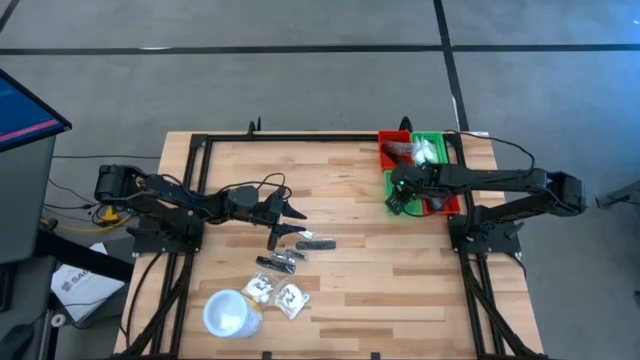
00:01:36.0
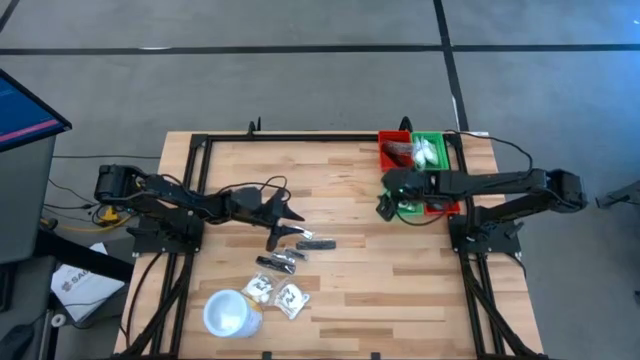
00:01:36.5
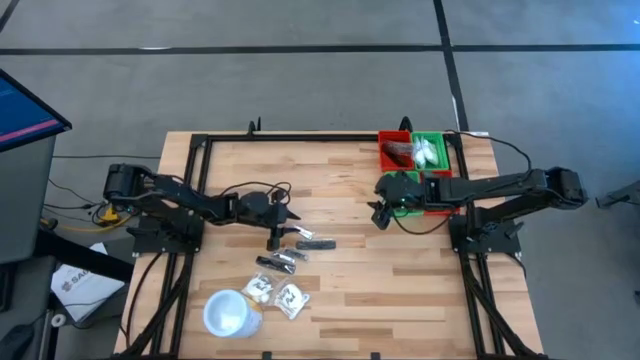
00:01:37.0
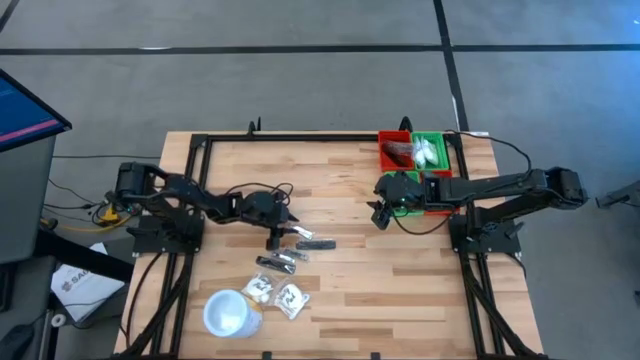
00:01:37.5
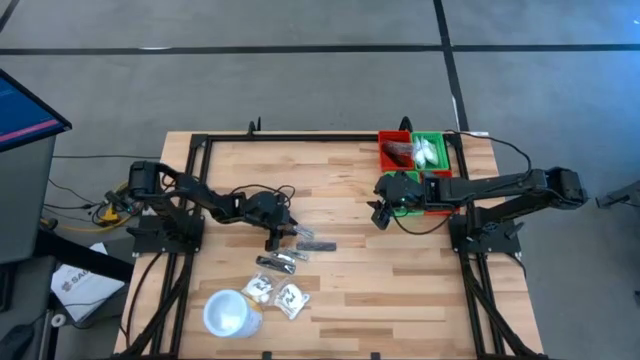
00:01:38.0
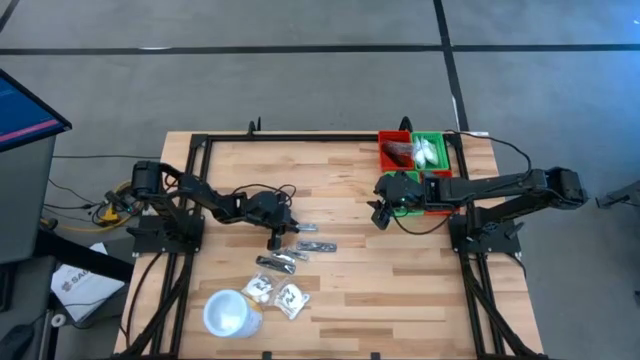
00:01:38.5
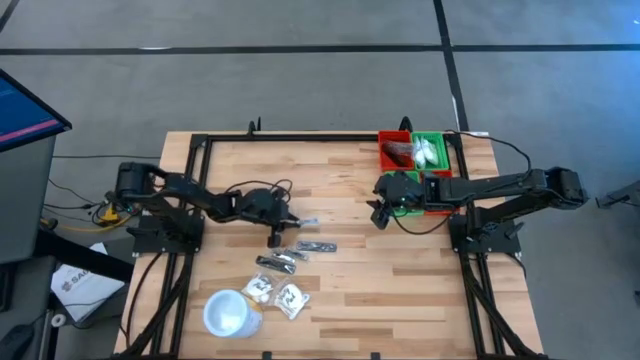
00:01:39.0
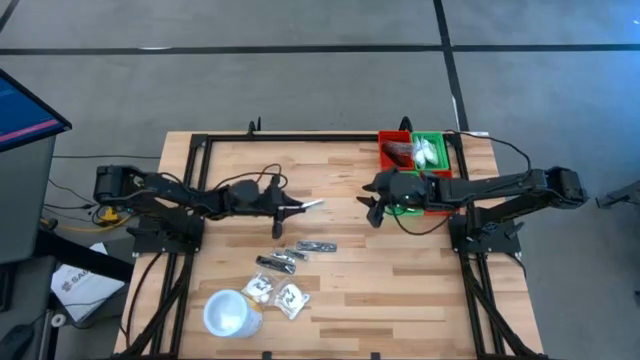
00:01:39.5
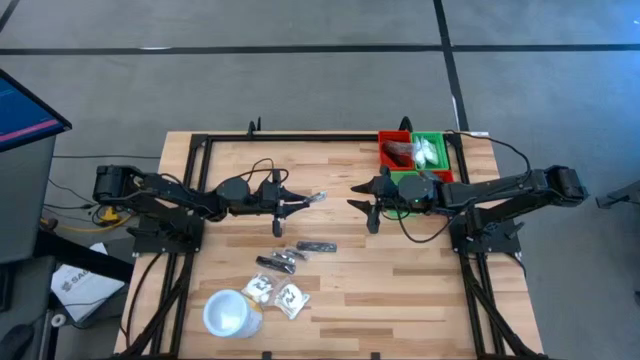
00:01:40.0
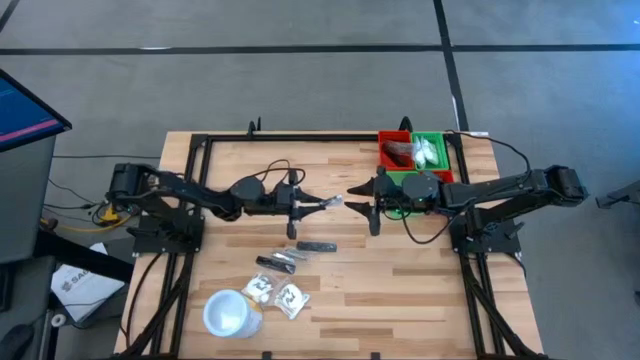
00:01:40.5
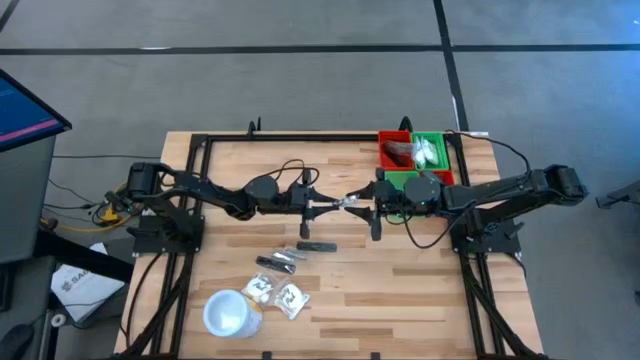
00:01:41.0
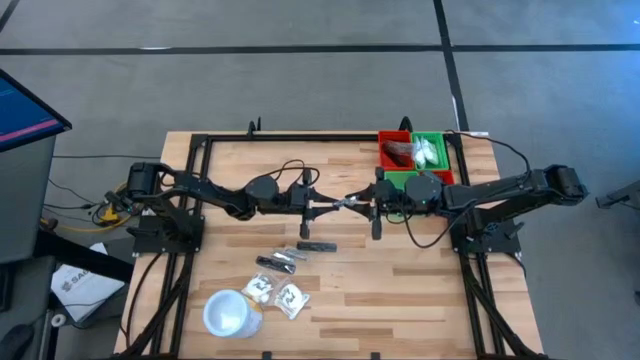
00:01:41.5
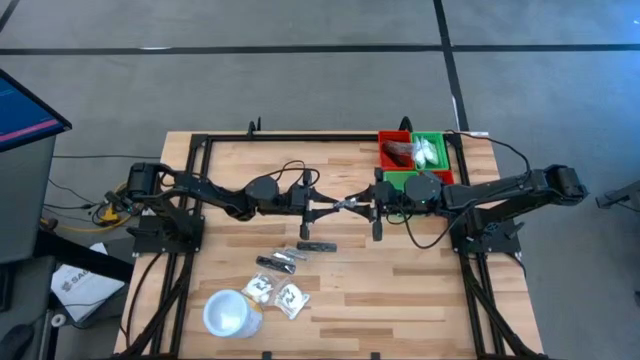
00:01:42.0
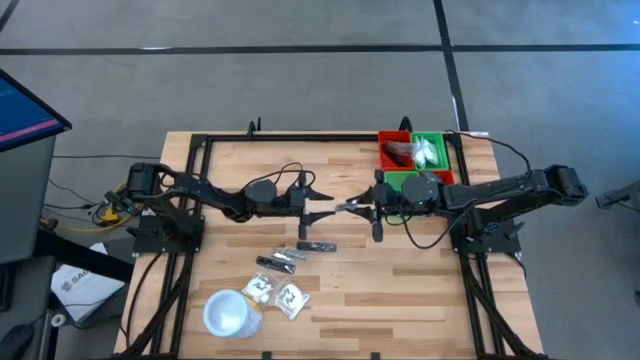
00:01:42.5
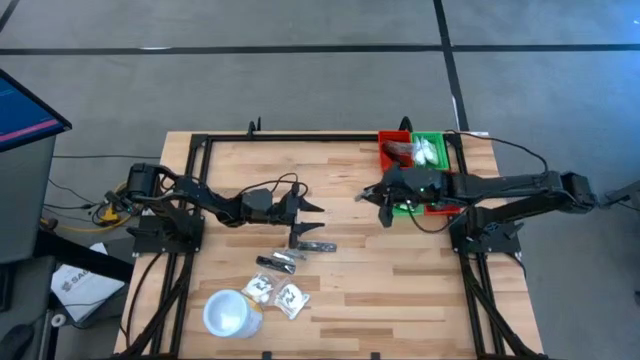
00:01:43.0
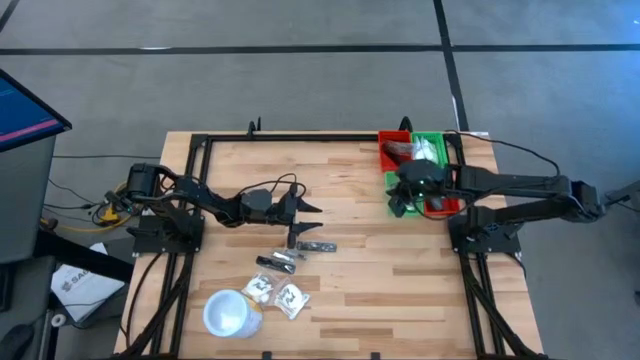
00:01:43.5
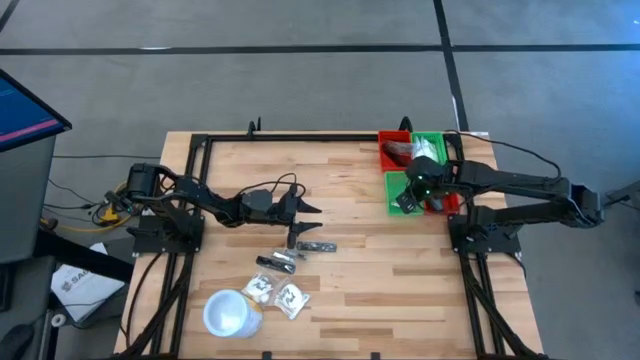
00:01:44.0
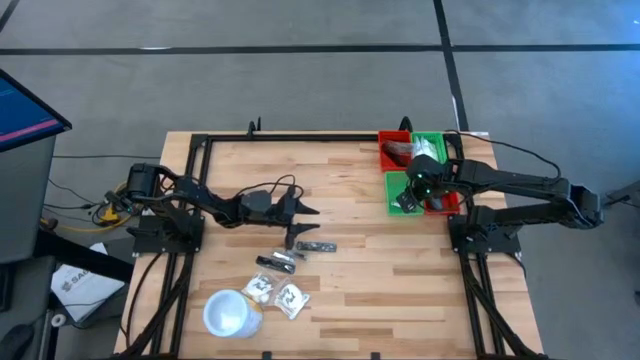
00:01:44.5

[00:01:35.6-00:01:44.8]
Task: Pick & Place Travel size toiletries
Put the silver nail cutter into the bottom green bin

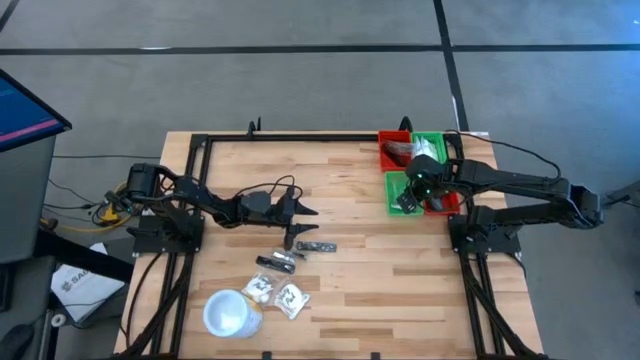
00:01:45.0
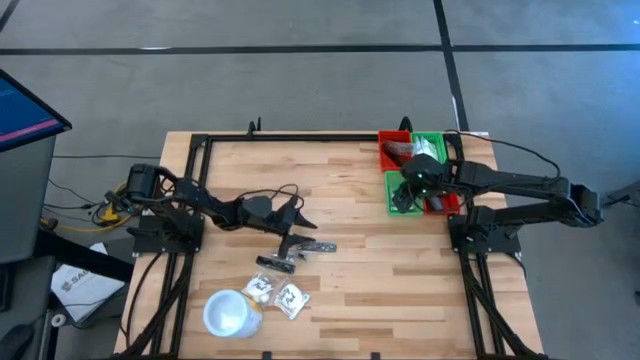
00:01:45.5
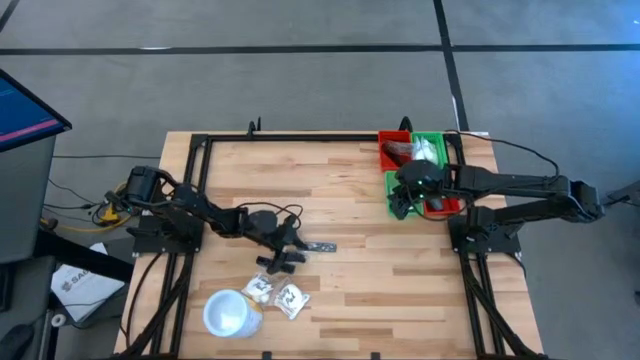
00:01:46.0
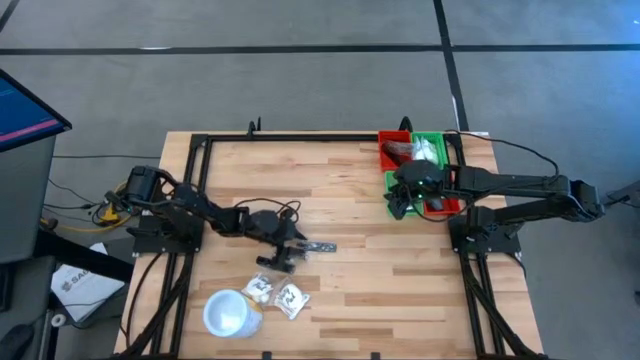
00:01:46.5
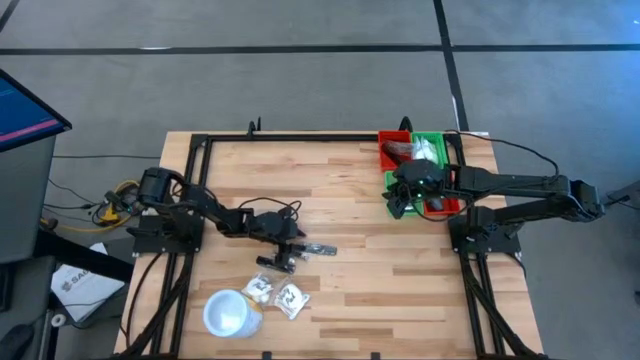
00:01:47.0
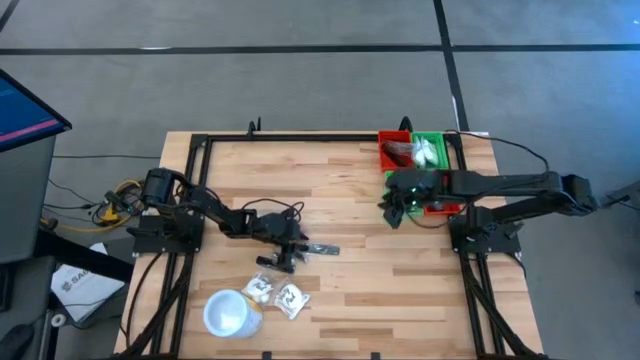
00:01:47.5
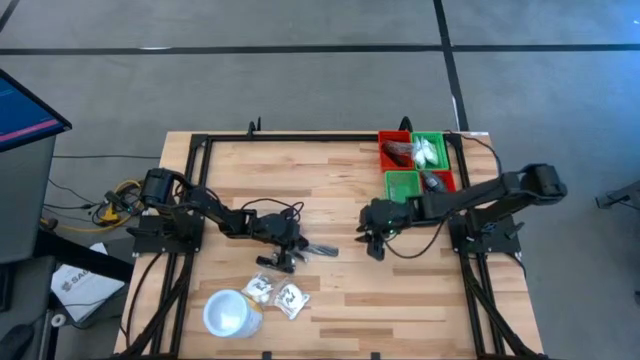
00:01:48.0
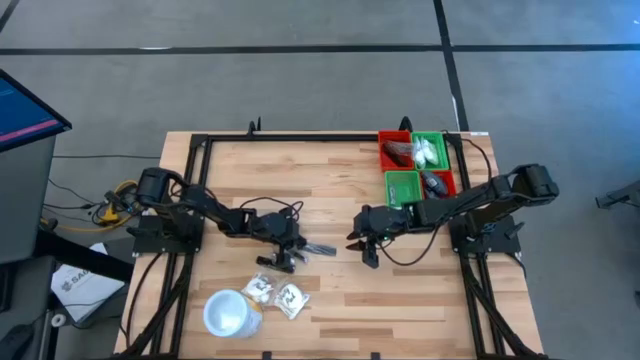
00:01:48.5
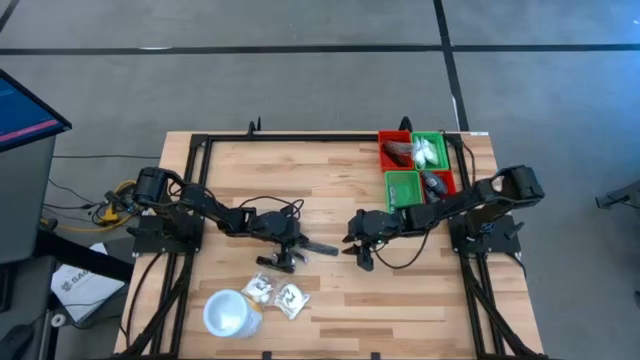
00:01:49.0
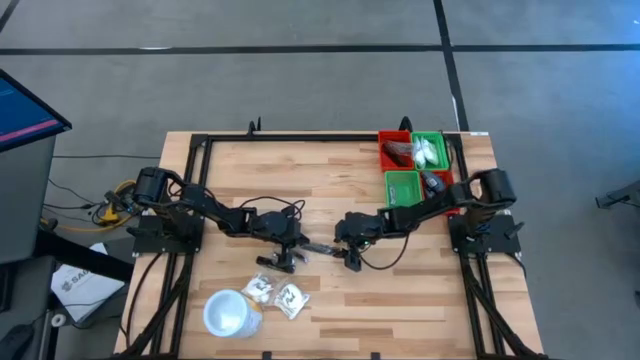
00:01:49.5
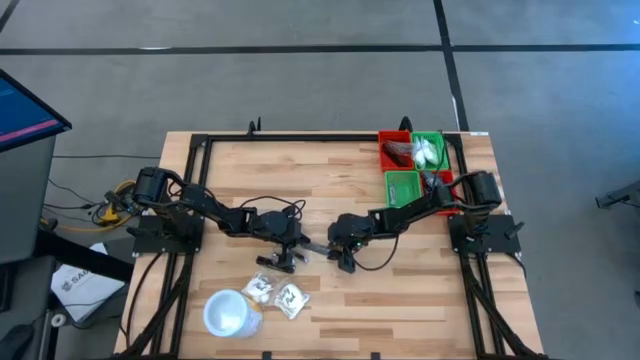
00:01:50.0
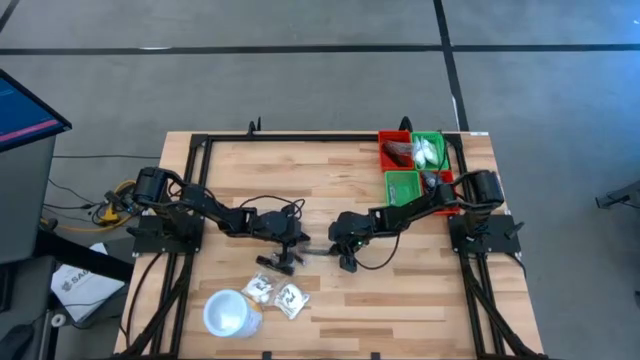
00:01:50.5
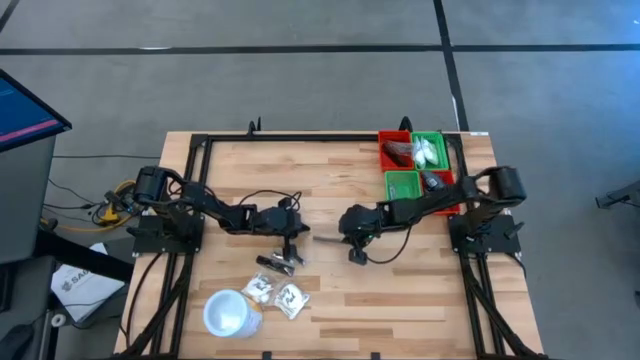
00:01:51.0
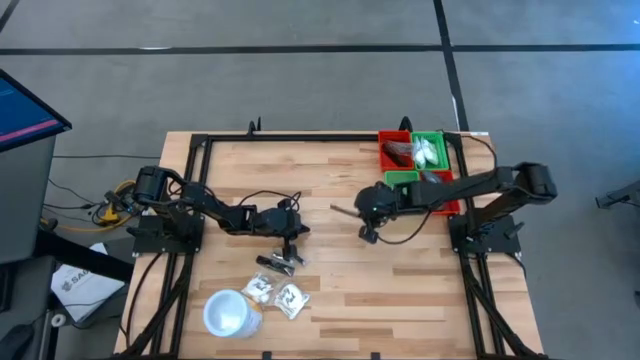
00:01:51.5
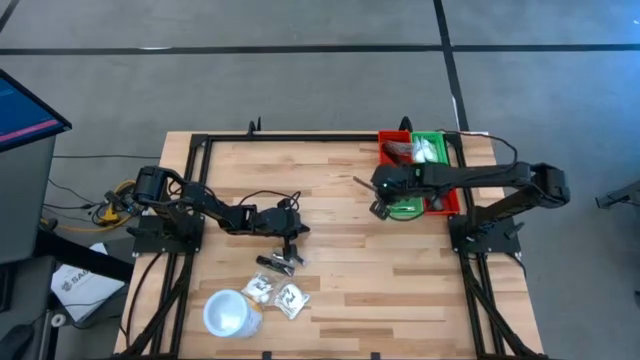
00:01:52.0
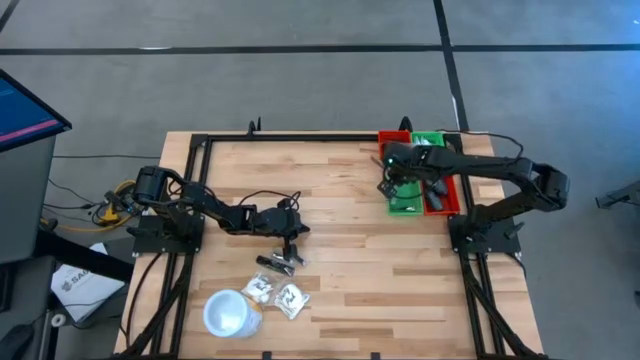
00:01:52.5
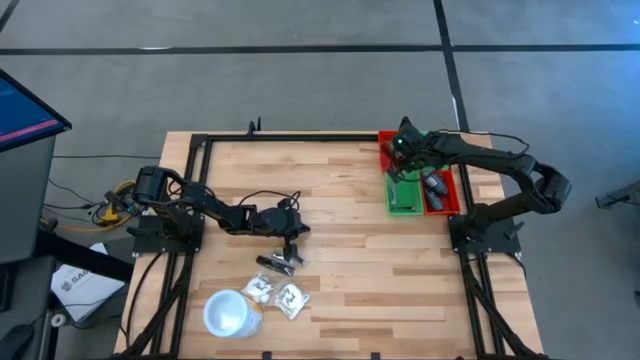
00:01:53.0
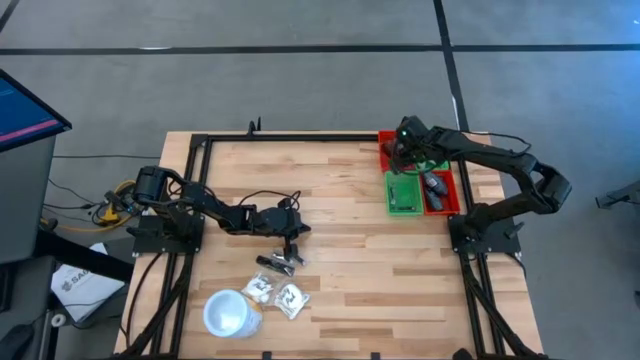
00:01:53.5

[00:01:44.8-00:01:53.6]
Put the black hair comb into the top red bin

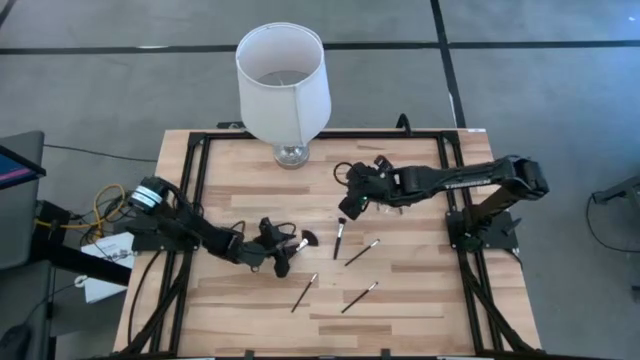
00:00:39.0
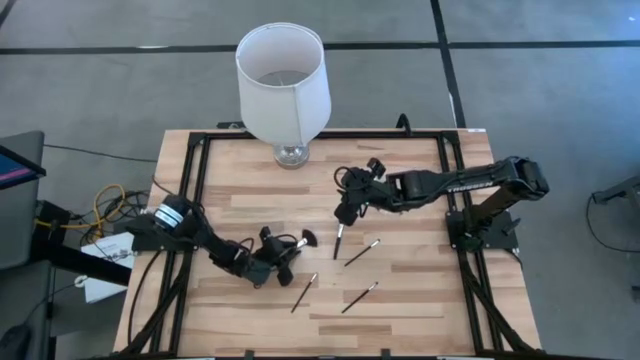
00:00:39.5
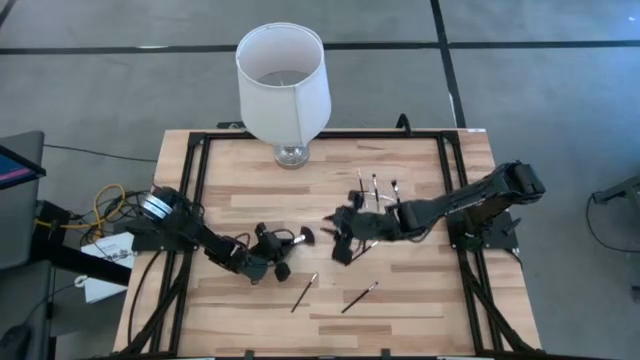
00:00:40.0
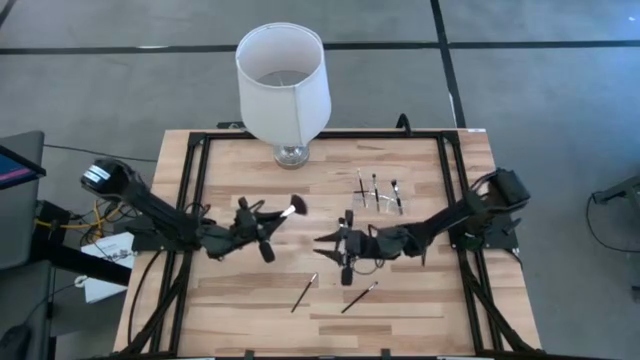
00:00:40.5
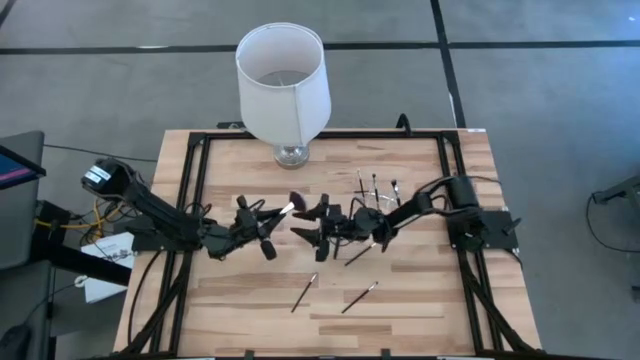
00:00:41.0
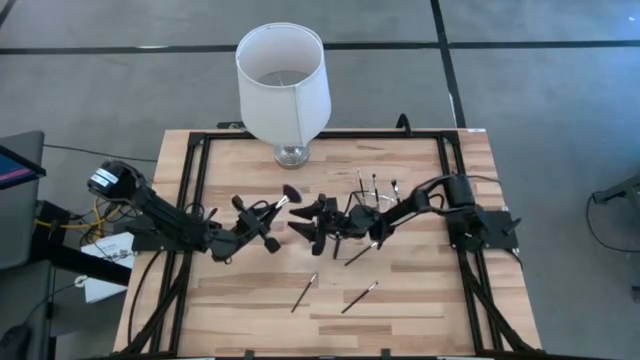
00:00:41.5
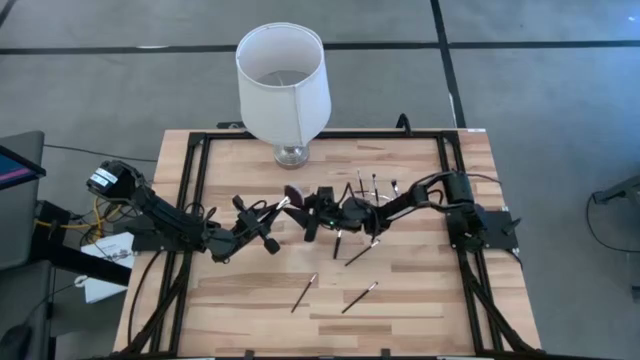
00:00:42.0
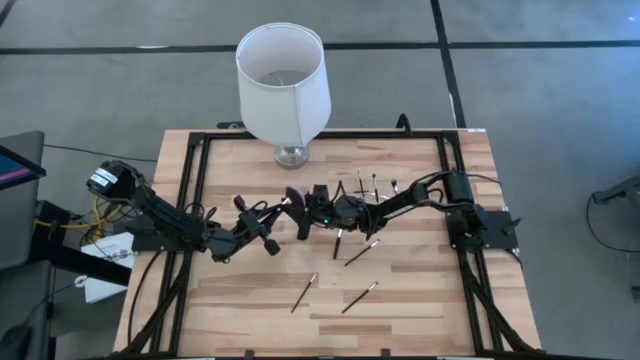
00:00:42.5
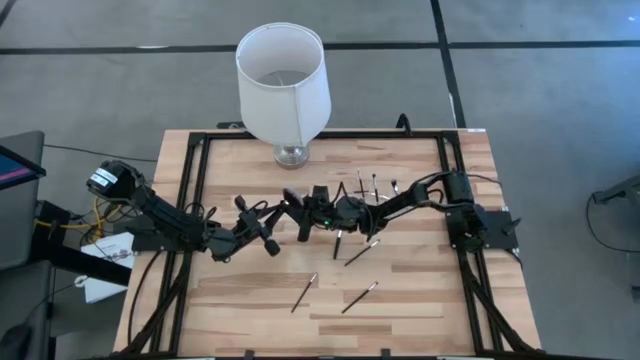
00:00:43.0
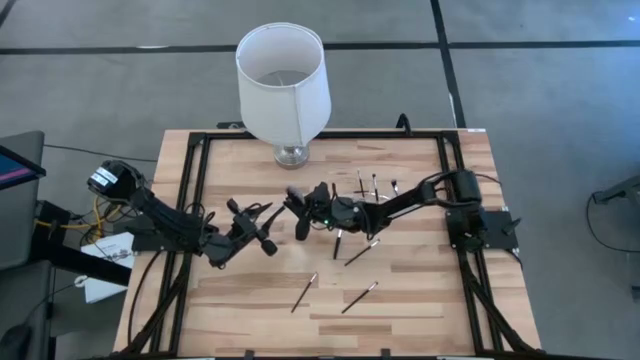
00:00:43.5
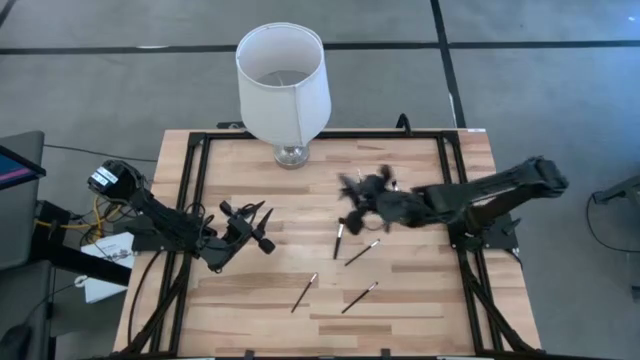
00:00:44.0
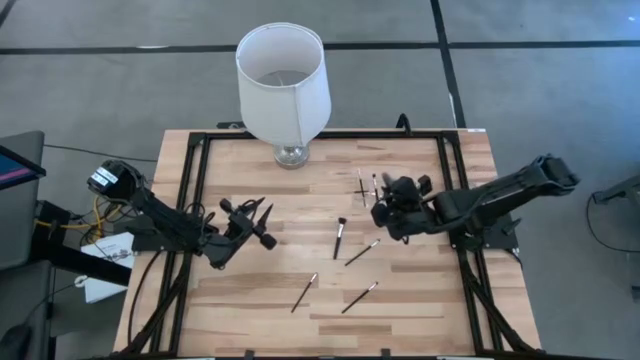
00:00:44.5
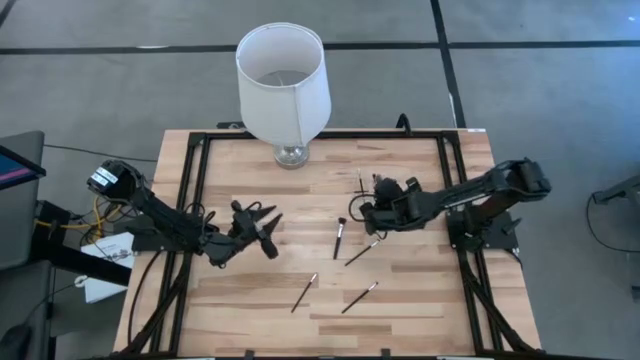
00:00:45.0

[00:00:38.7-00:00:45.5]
Task: Pick & Place Makeup Supplies
Put the black makeup brush into the transparent organizer
